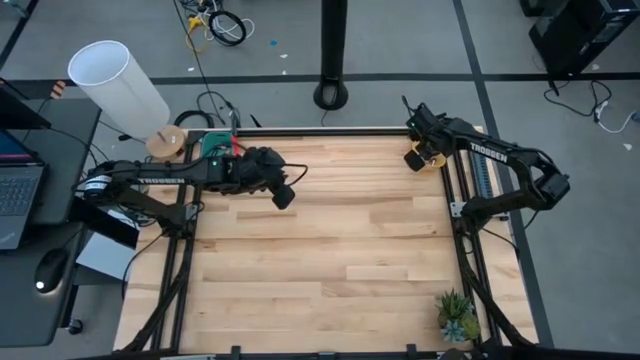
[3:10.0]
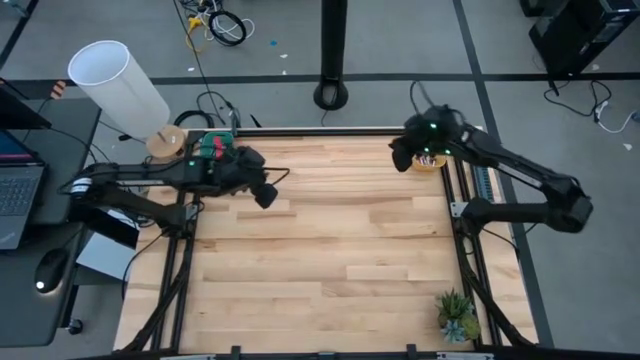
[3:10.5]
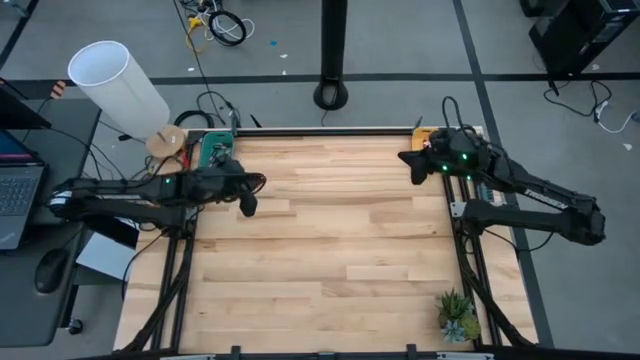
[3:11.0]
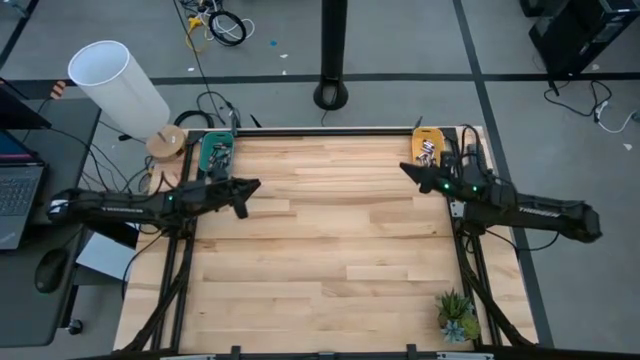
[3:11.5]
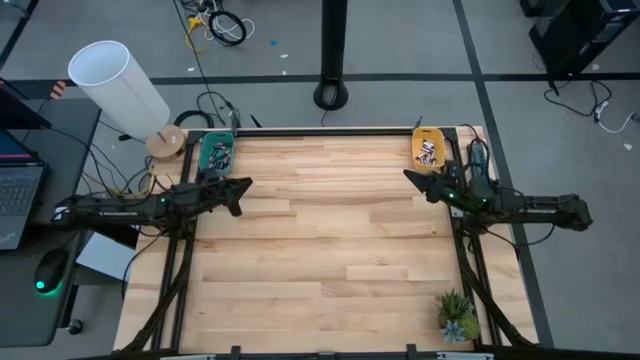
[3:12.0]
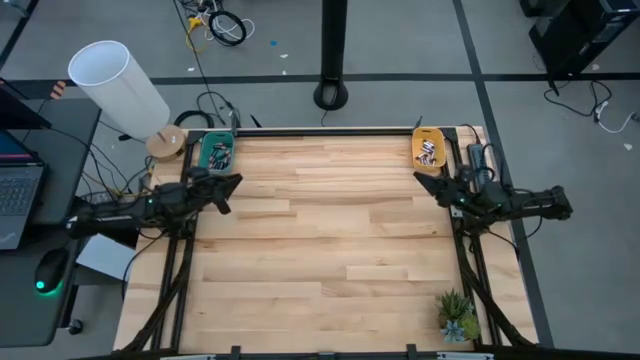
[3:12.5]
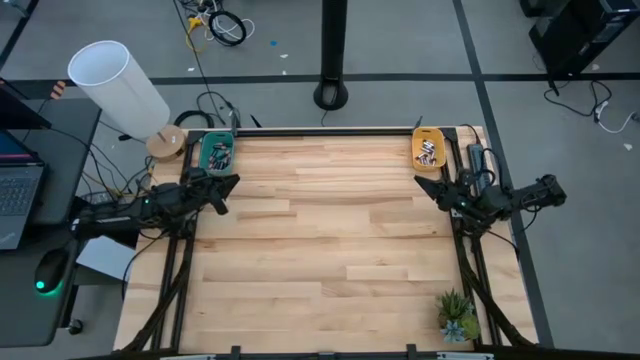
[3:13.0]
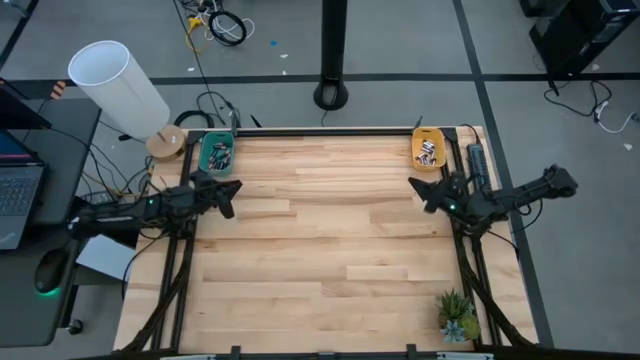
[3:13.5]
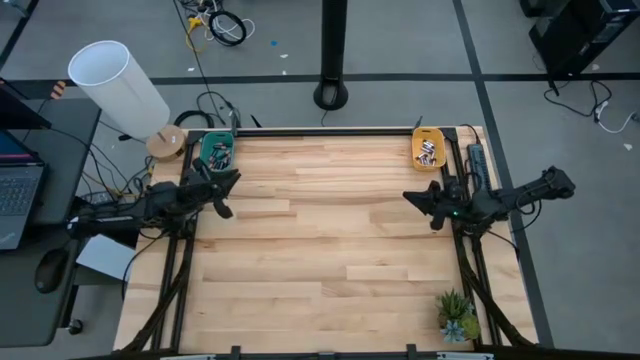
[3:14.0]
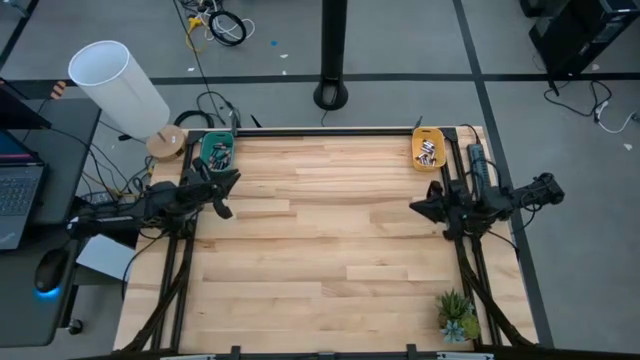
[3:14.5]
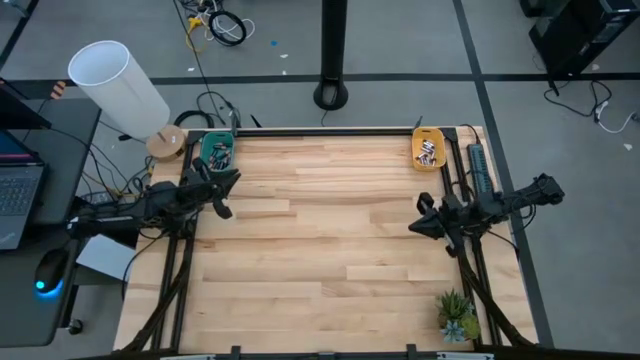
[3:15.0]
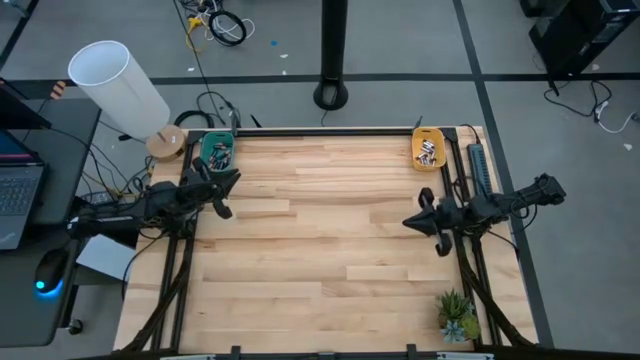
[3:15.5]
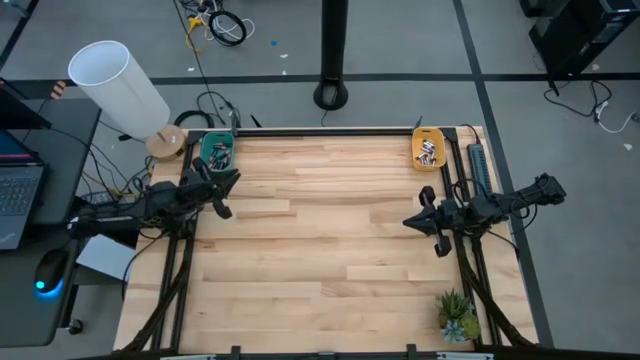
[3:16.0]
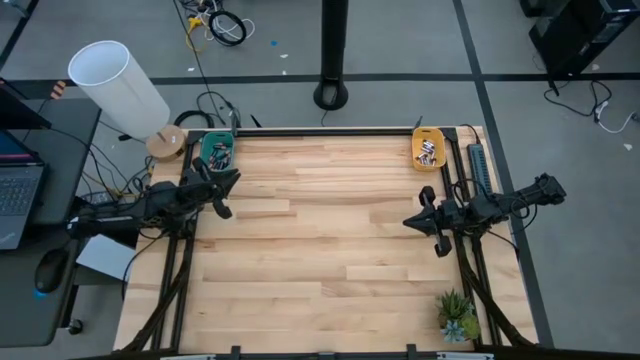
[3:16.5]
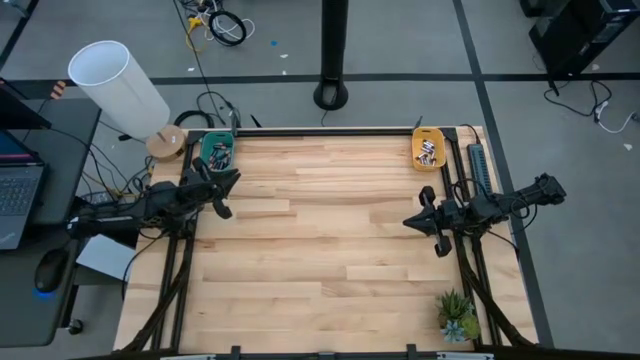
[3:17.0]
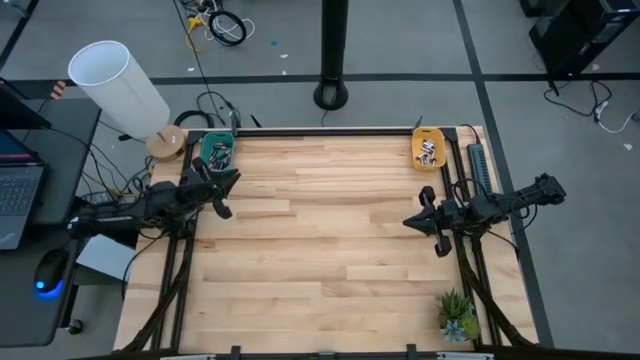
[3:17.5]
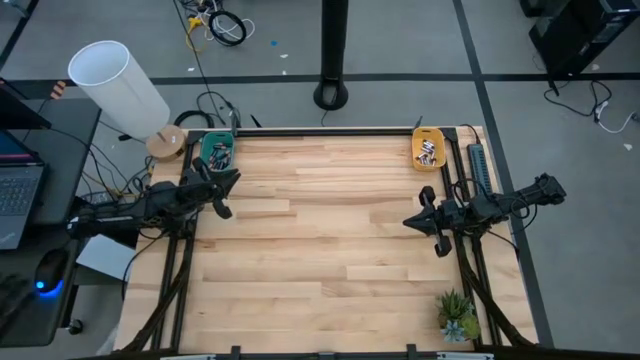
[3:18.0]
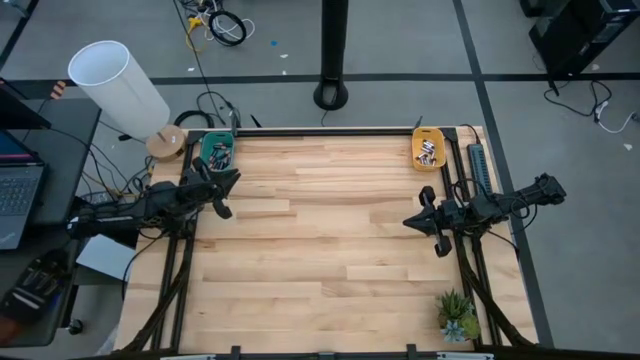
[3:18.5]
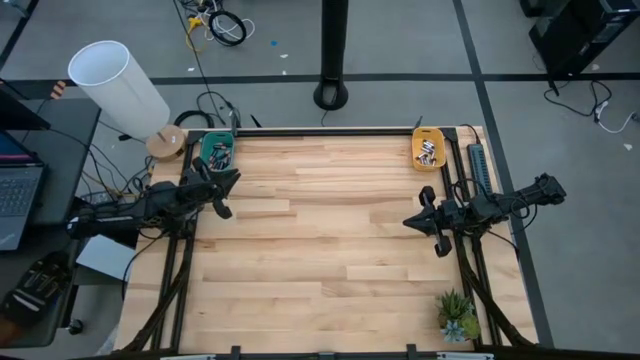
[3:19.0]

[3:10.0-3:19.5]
Task: Sort batteries
Return to Home Position

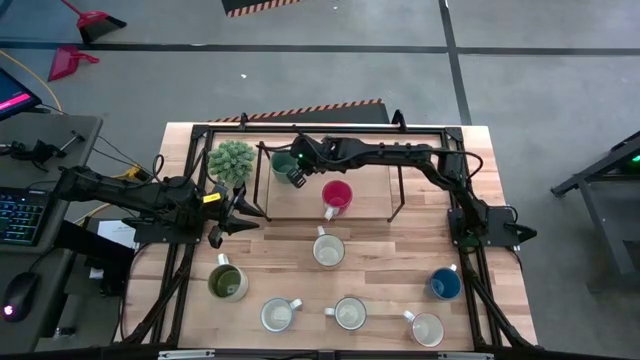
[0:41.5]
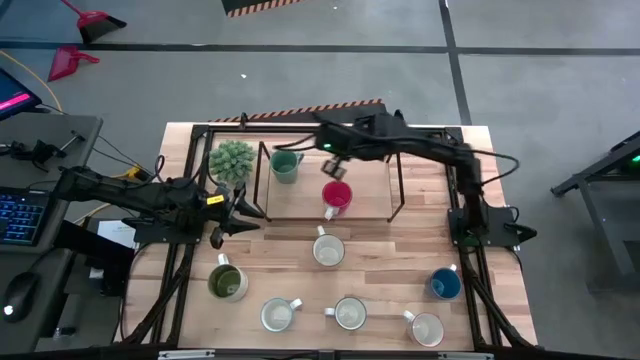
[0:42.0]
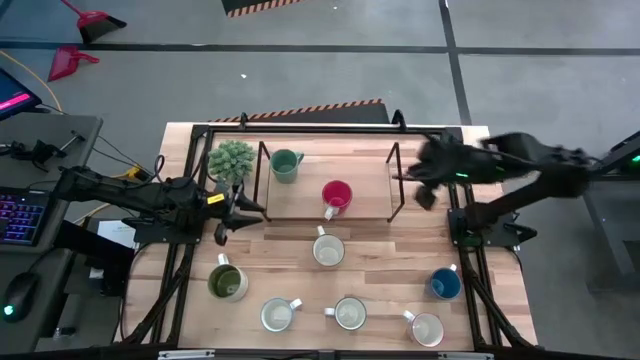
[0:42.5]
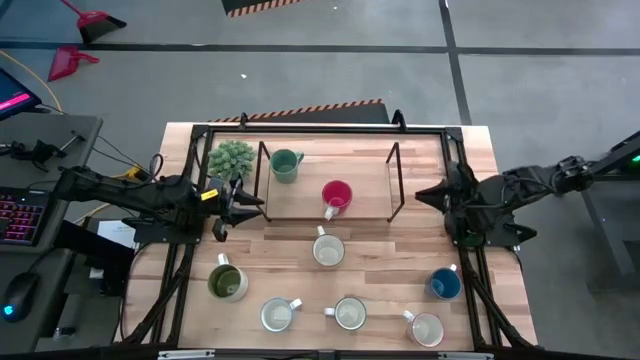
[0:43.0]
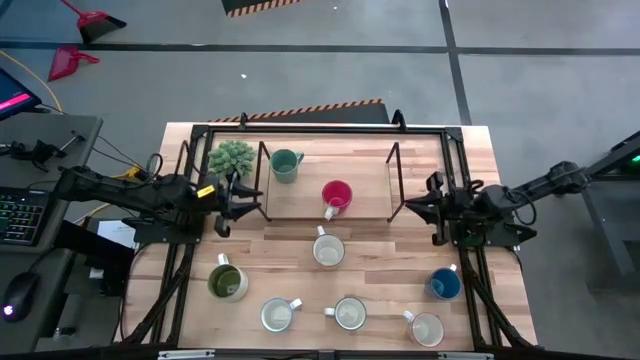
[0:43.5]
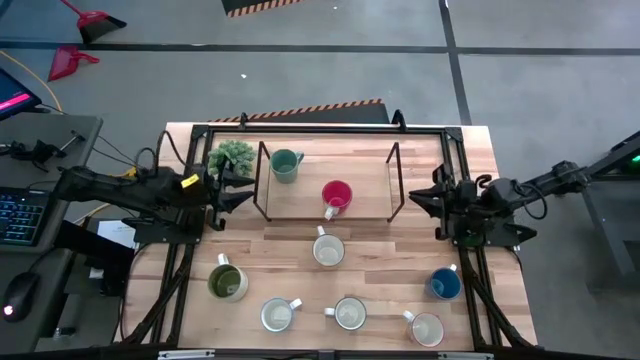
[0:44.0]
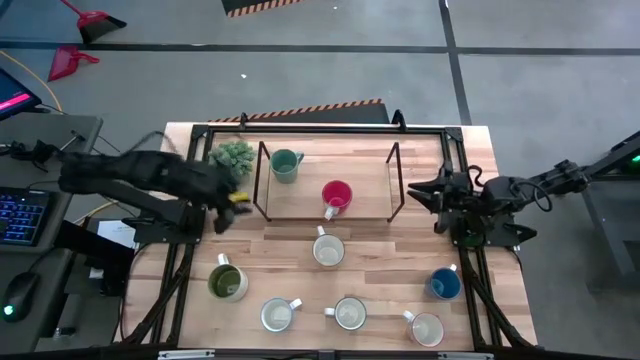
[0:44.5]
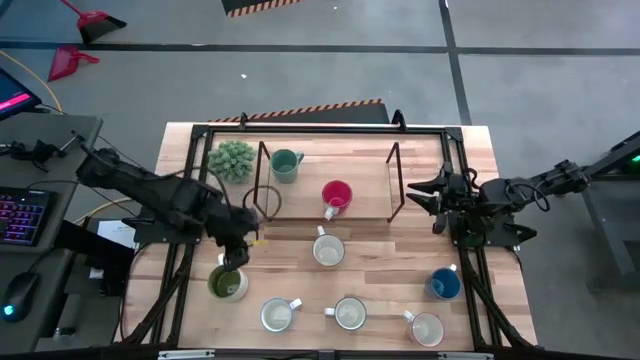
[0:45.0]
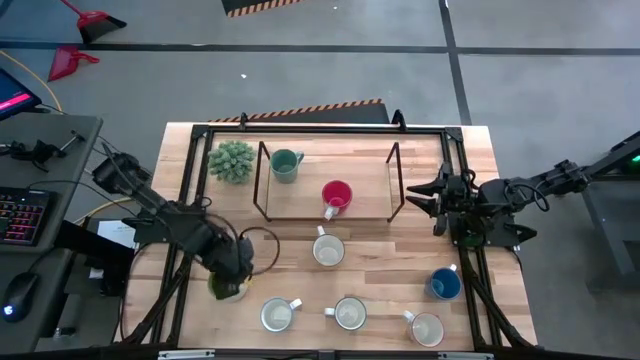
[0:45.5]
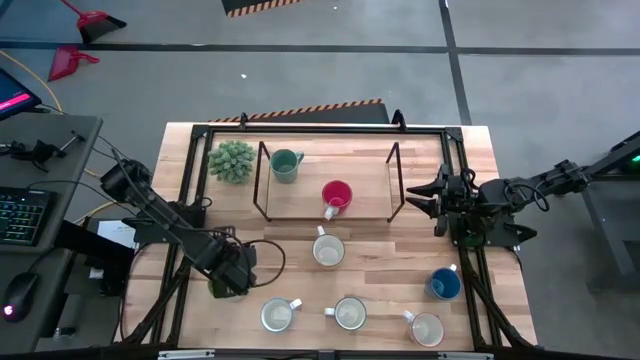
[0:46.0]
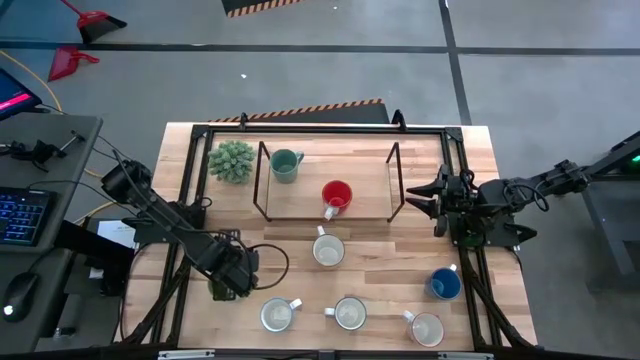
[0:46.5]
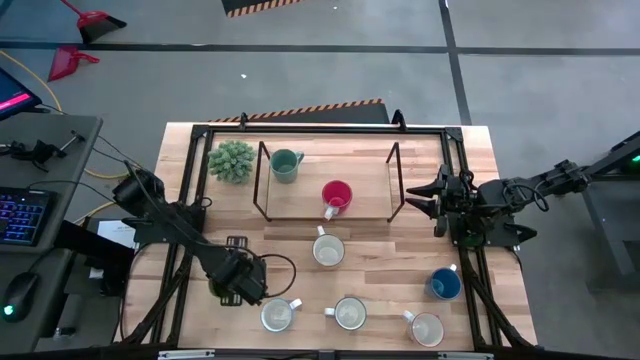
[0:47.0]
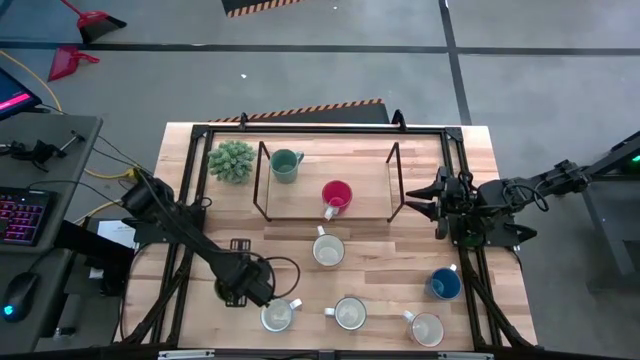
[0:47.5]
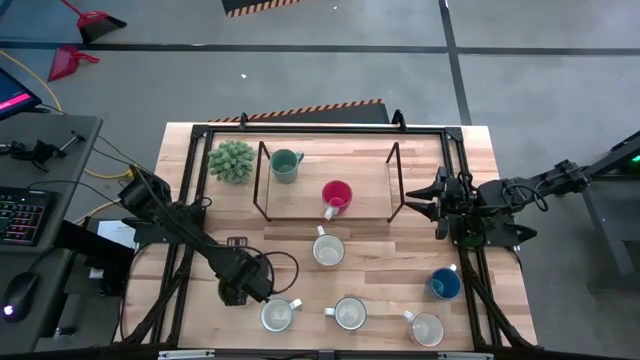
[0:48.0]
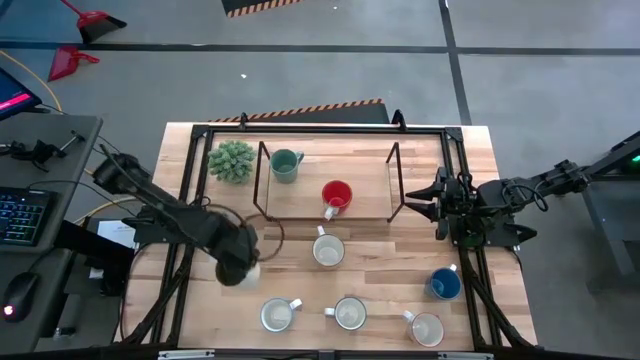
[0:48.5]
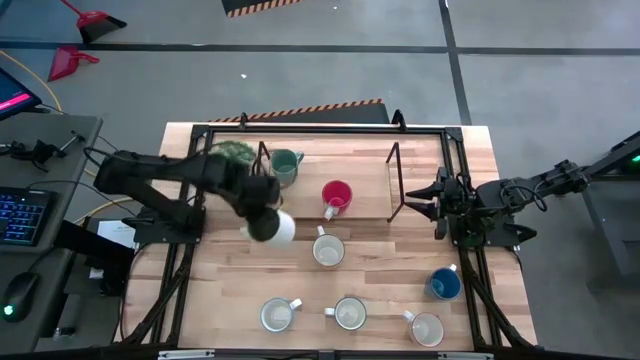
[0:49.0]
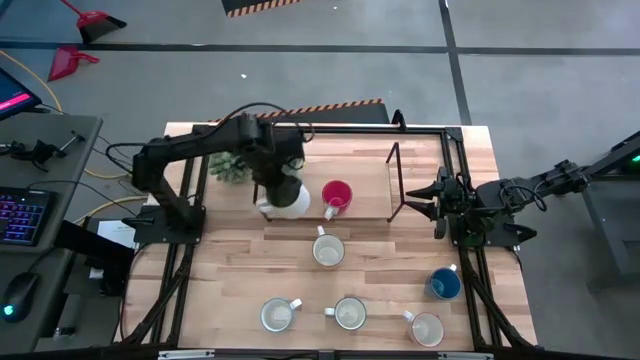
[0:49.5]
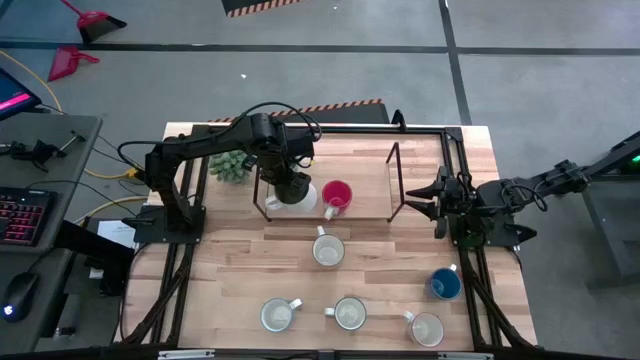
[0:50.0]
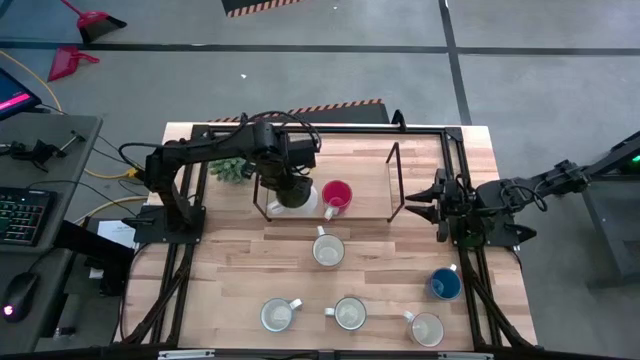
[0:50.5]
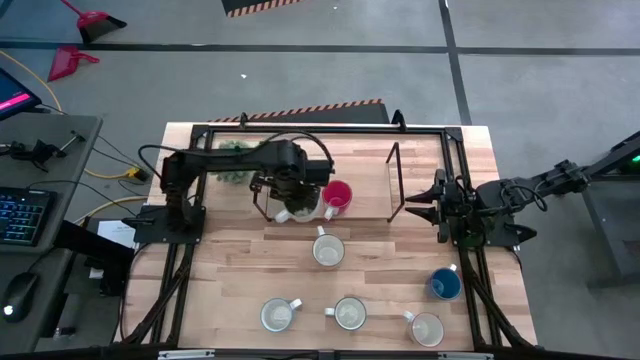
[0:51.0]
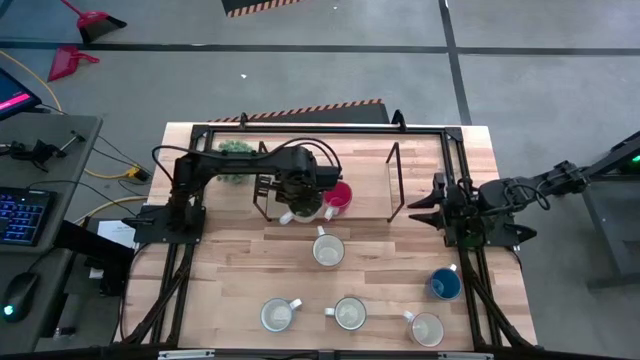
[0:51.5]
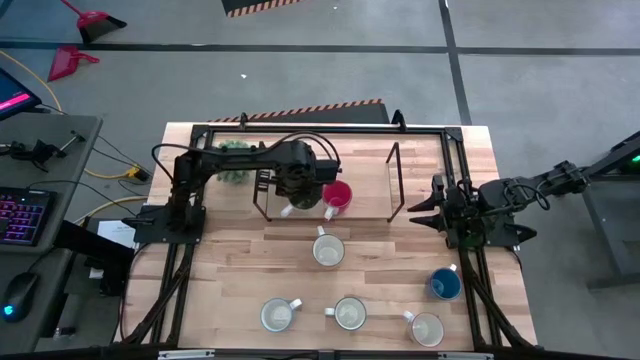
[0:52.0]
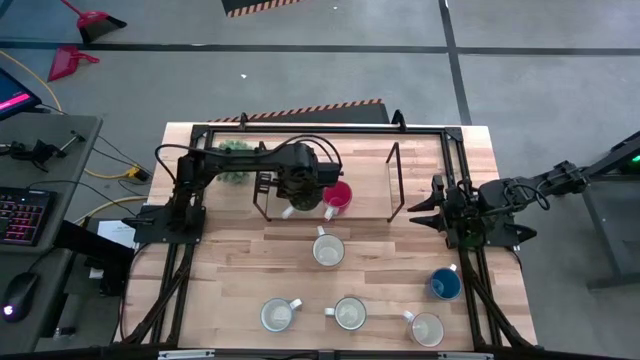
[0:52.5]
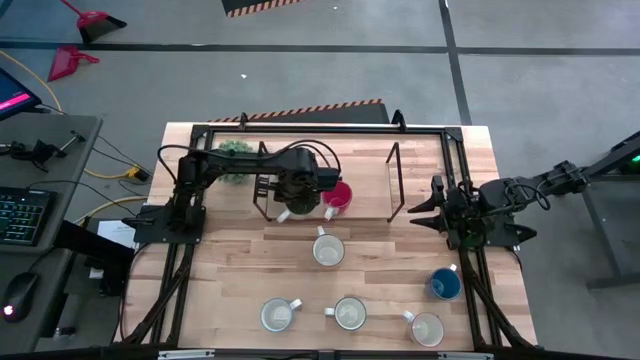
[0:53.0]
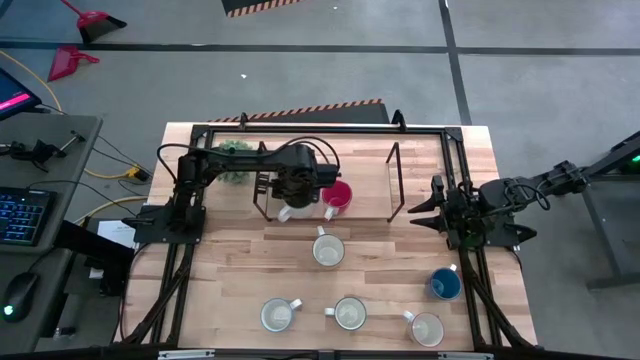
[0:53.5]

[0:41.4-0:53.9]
Task: Place coffee mugs
Put the white mug on the shelf
